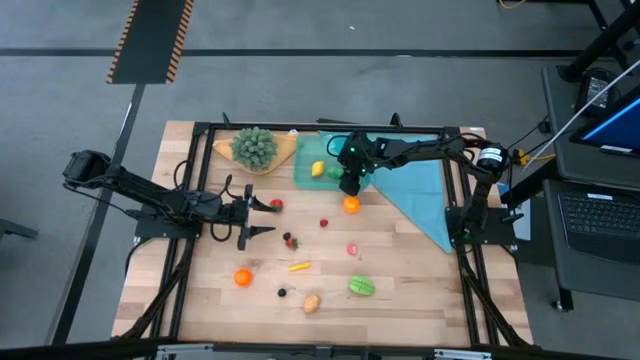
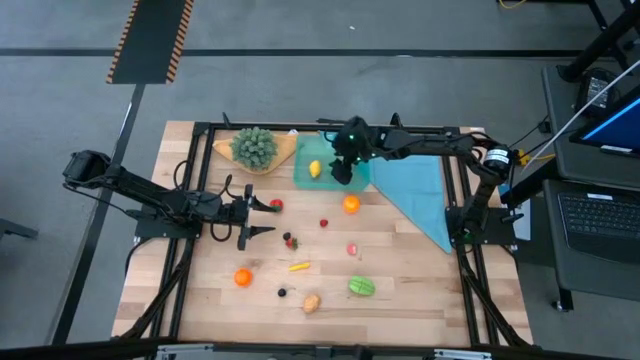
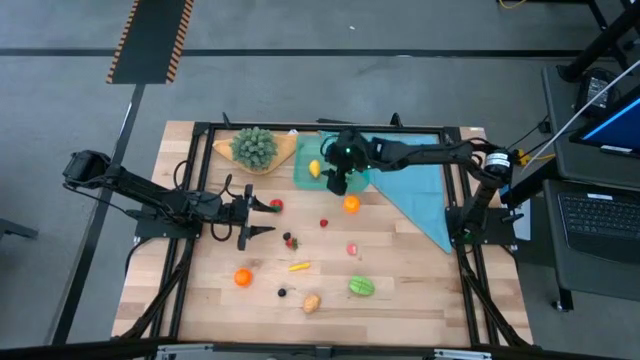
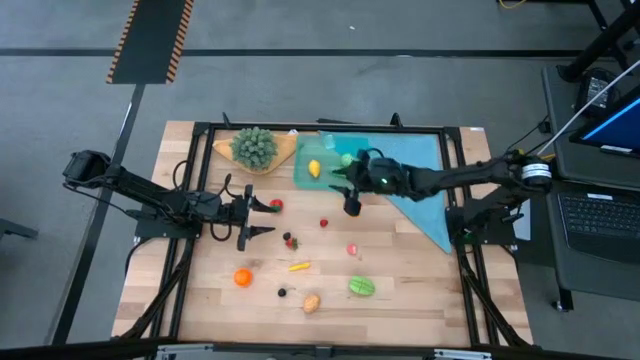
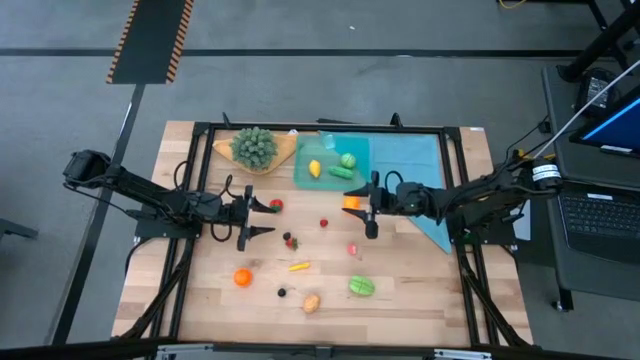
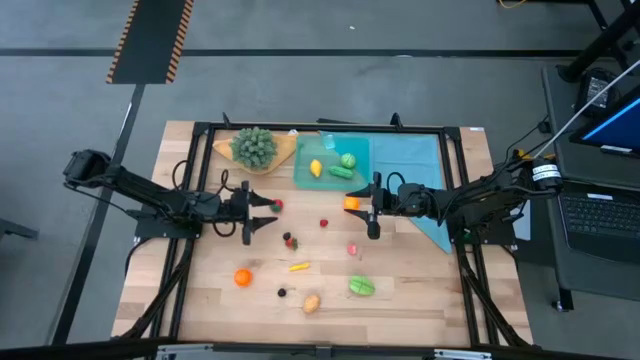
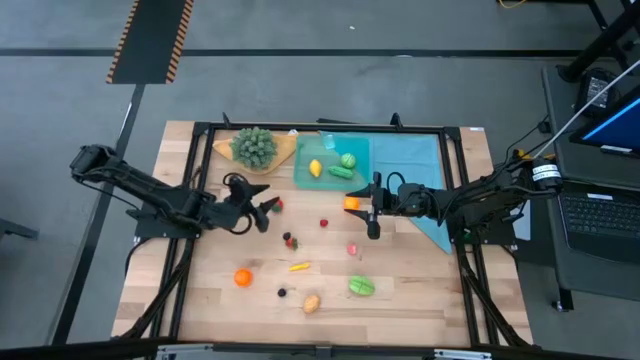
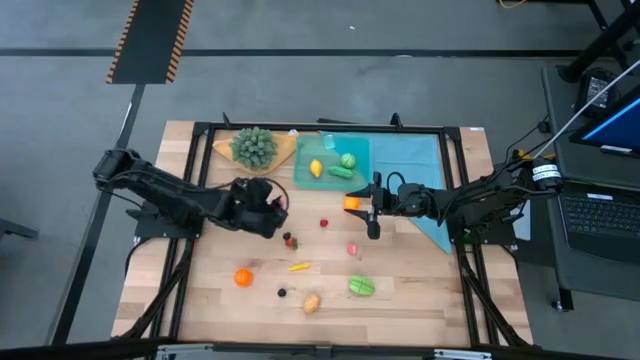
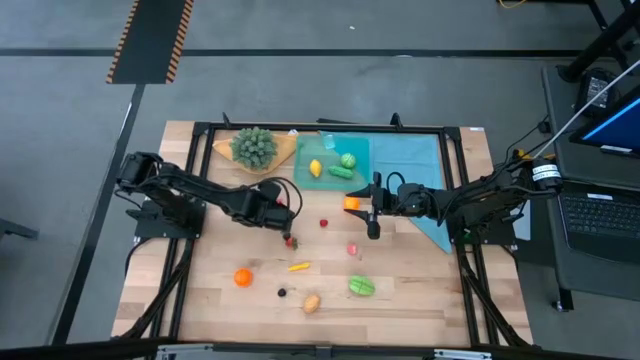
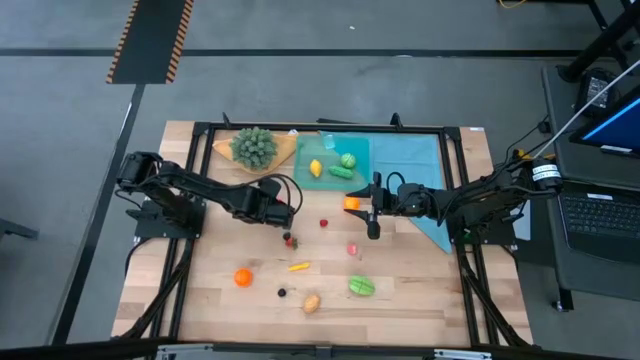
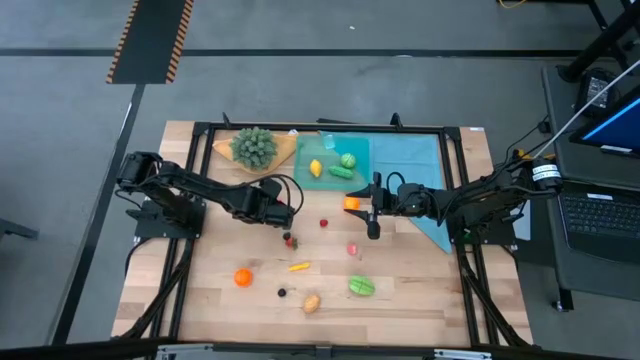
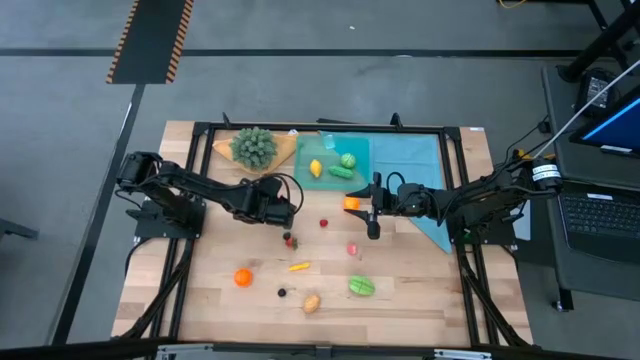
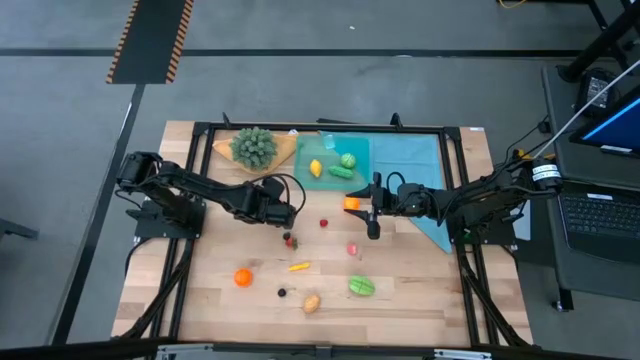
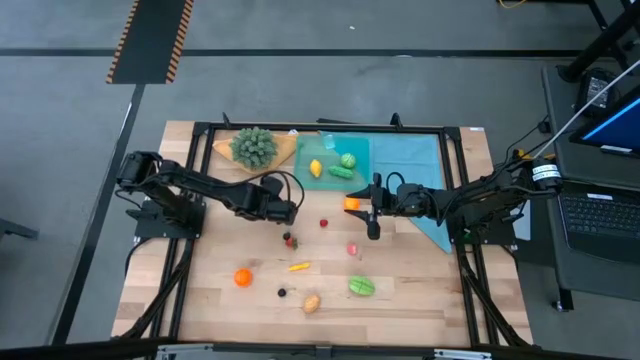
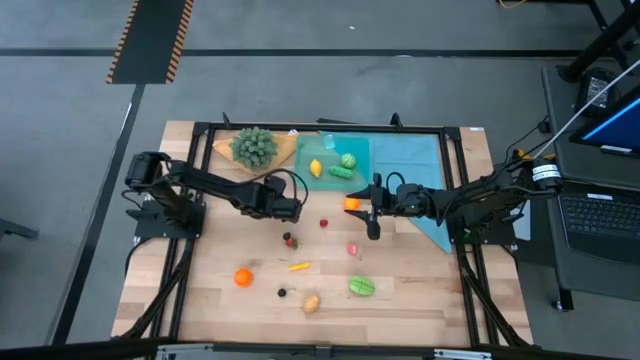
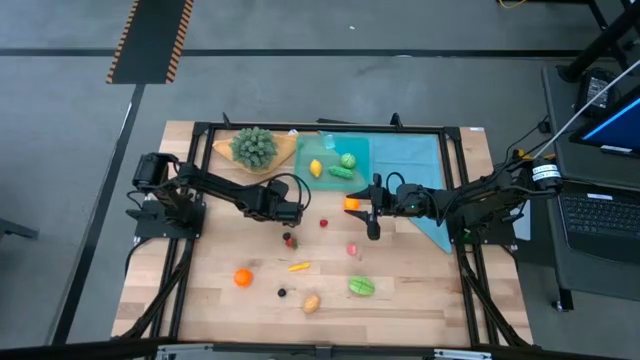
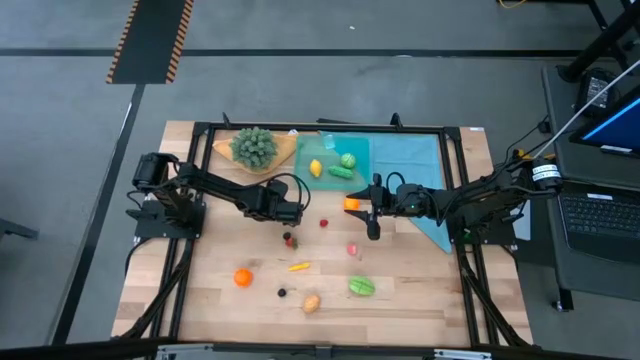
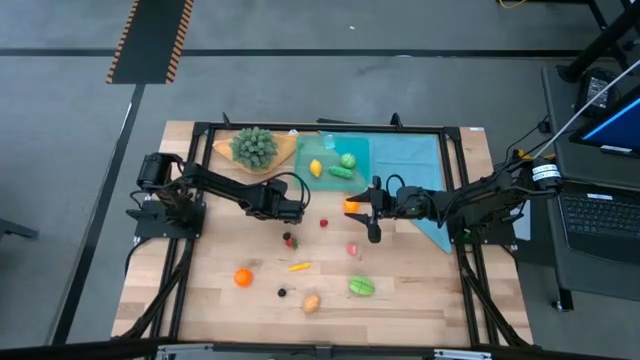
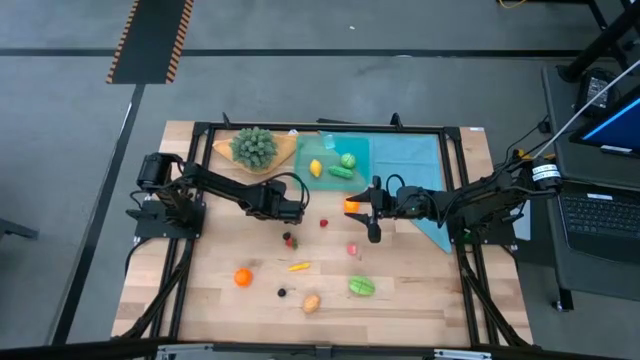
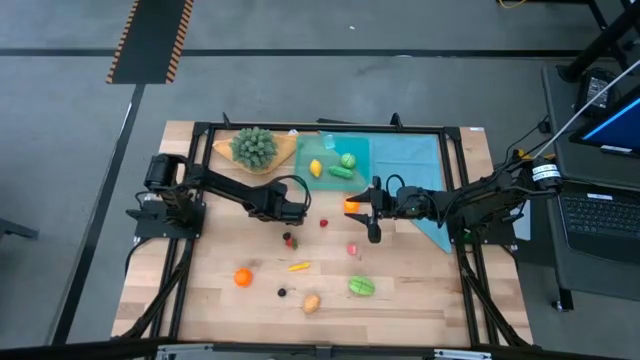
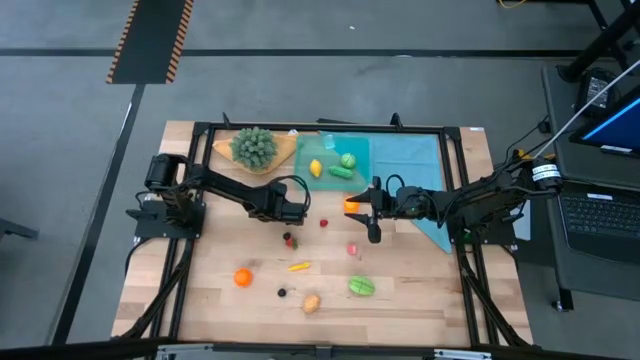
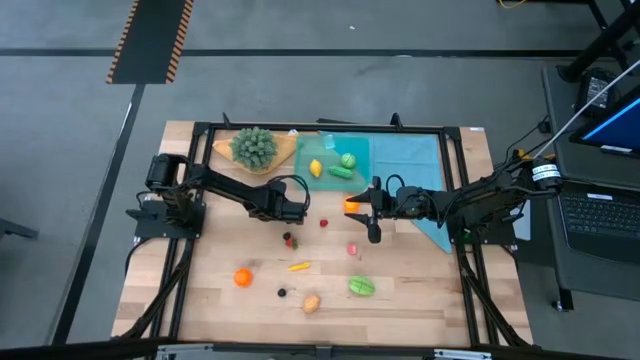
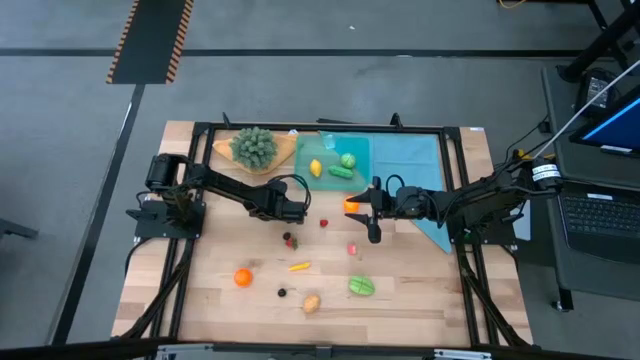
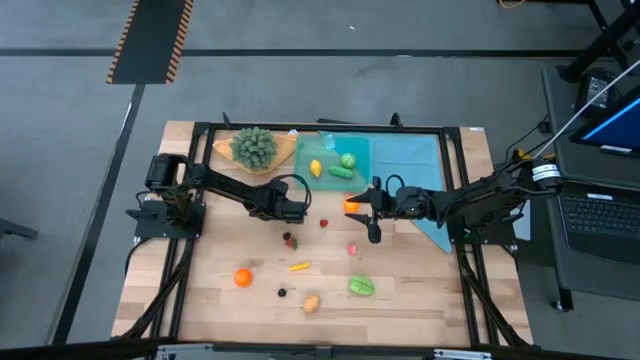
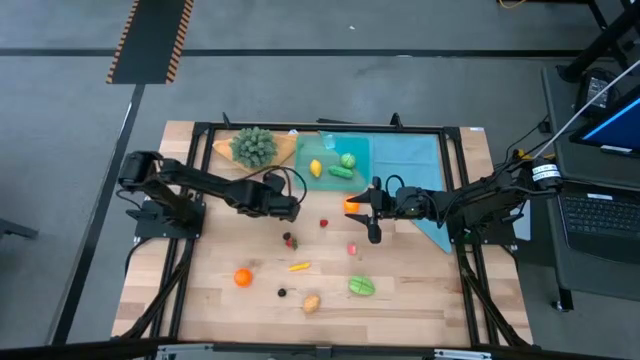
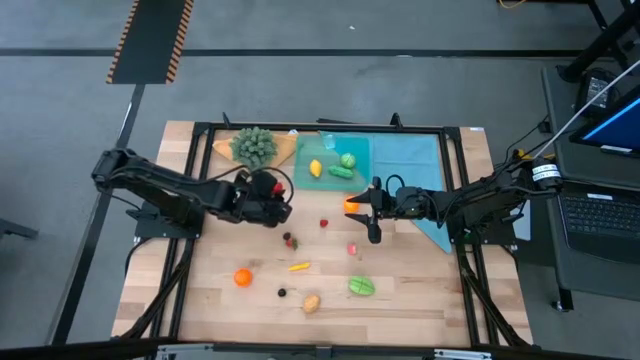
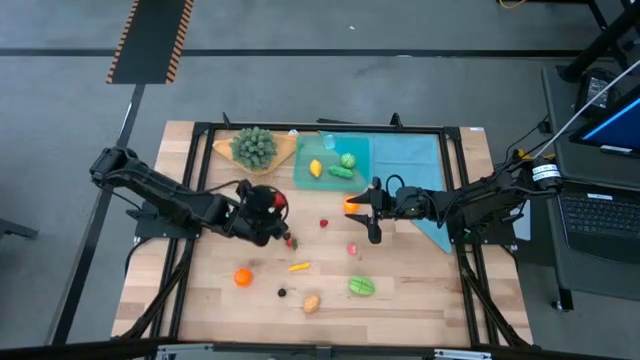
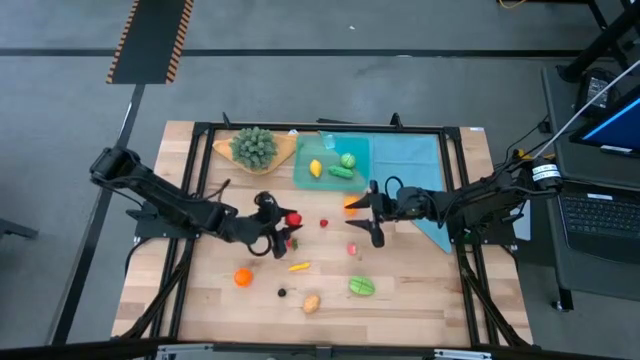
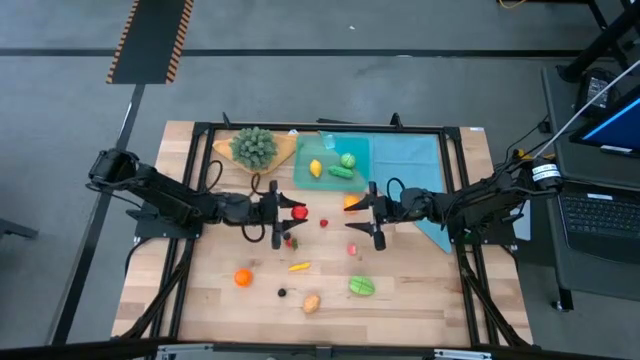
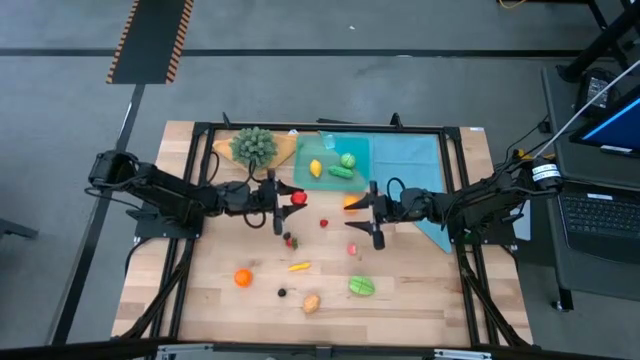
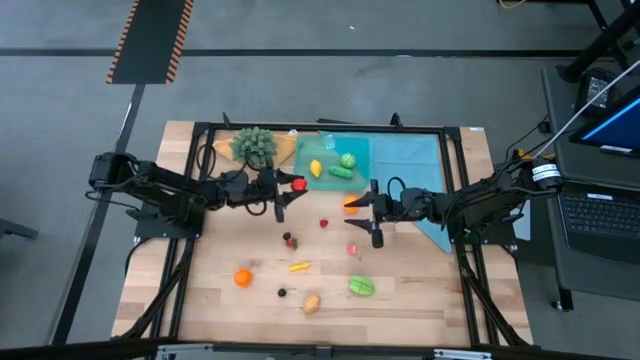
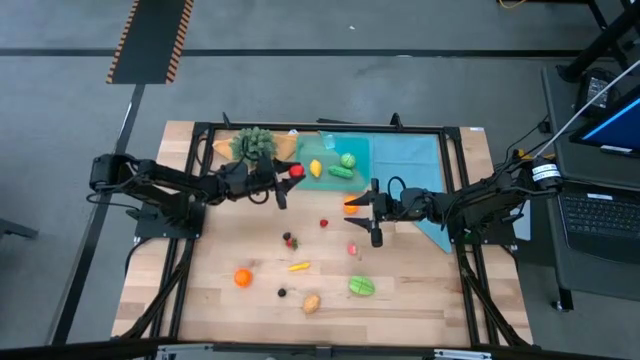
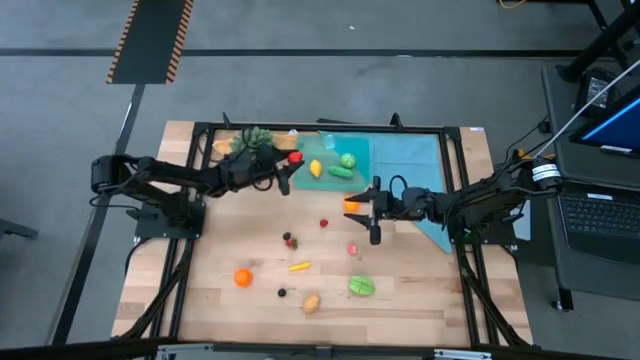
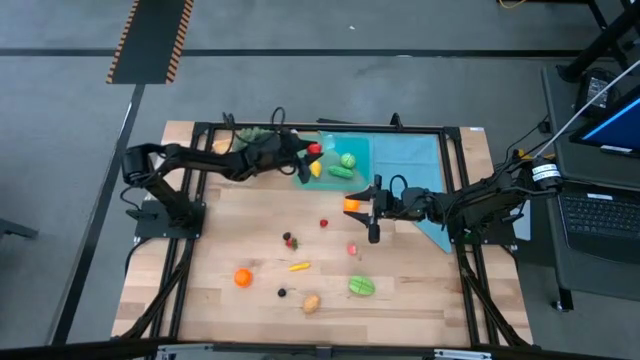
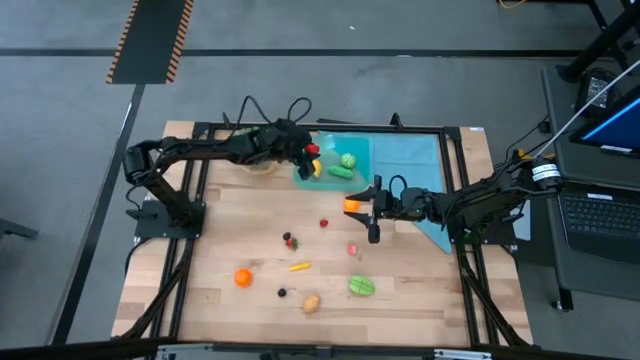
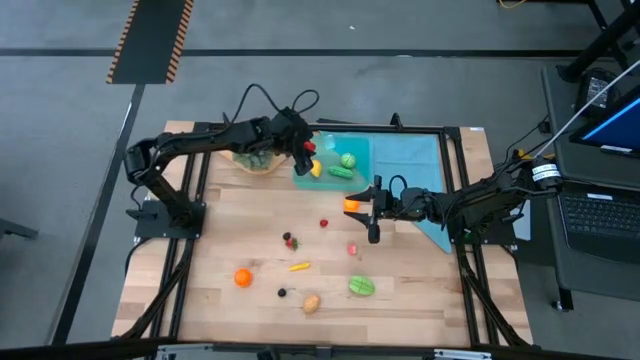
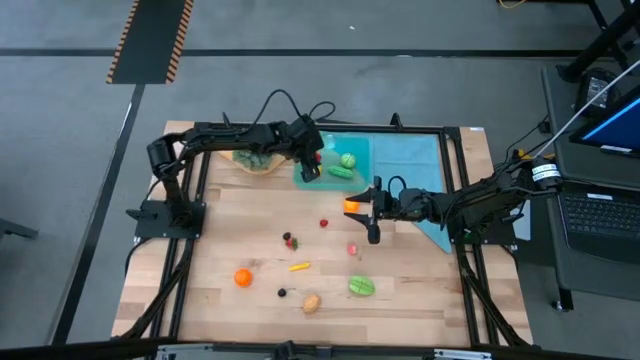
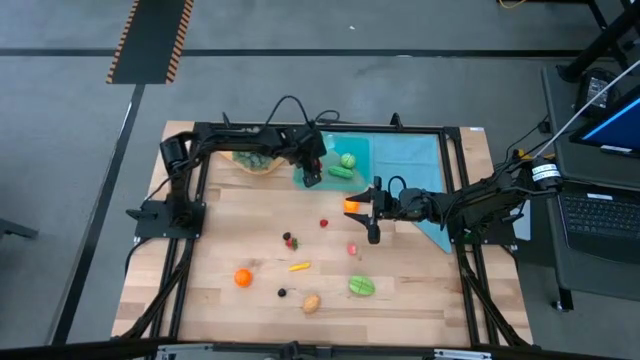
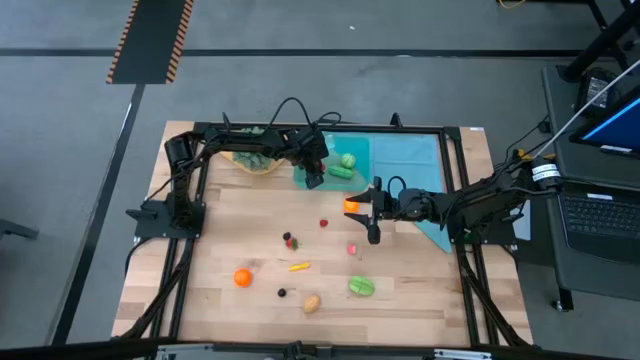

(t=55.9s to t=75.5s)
Task: Pick and placing Produce into tupperware
Put the left strawberry into the blue bin
